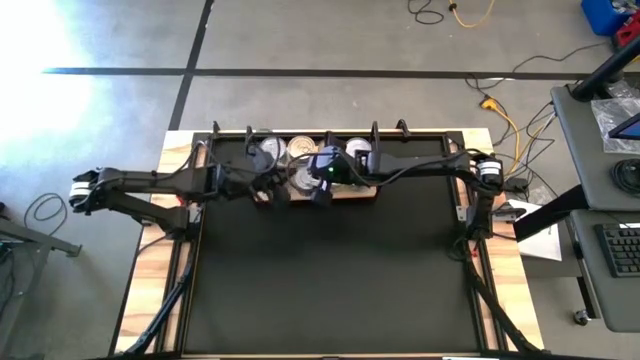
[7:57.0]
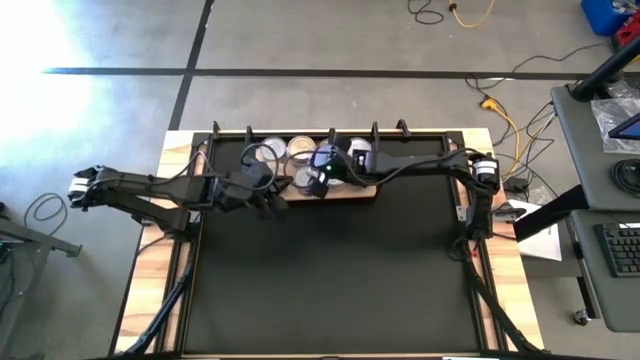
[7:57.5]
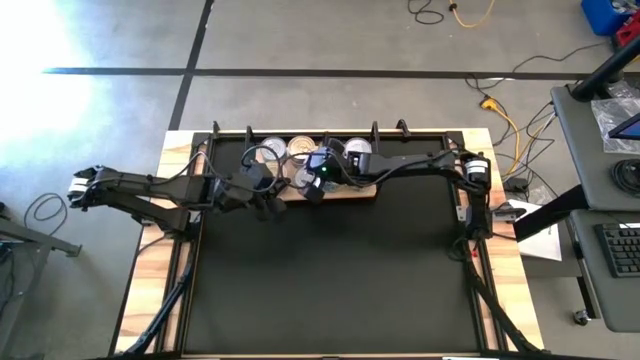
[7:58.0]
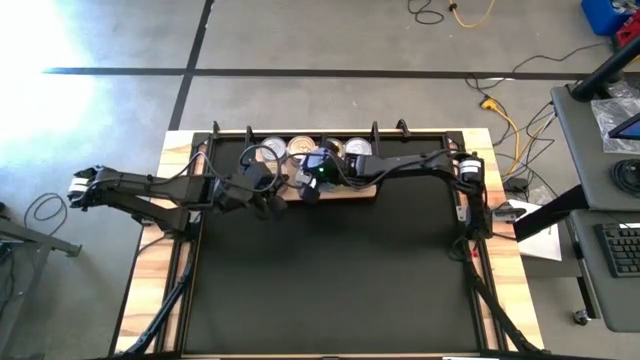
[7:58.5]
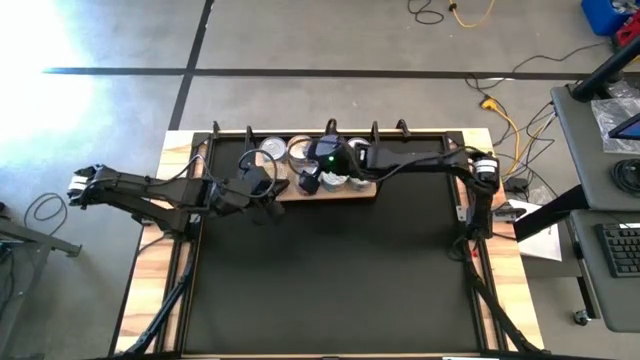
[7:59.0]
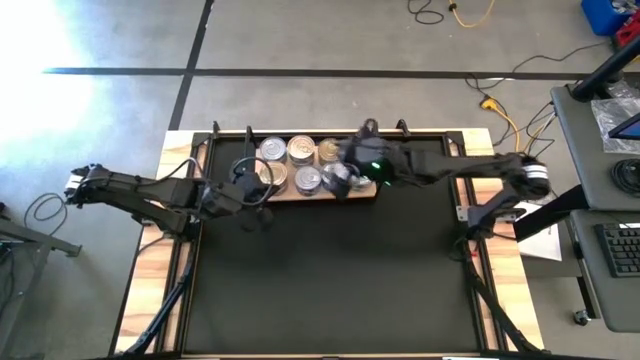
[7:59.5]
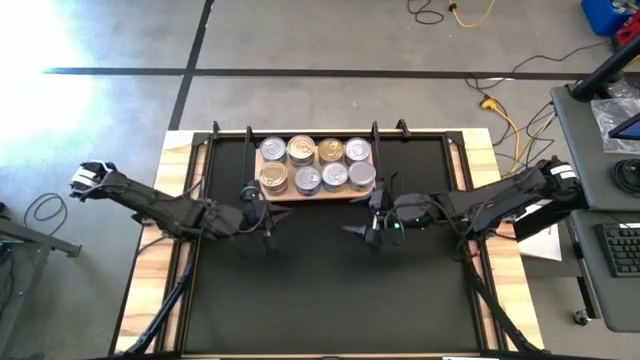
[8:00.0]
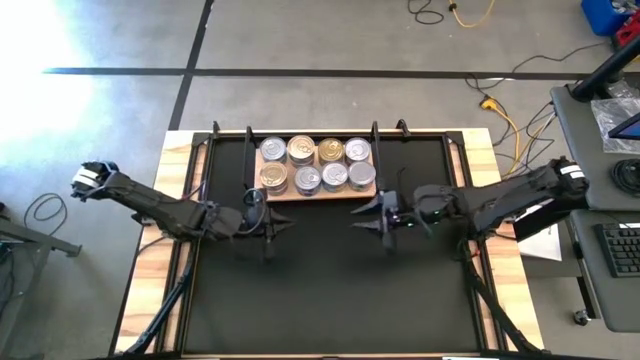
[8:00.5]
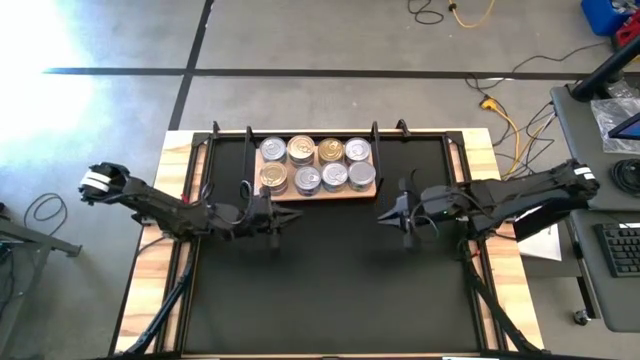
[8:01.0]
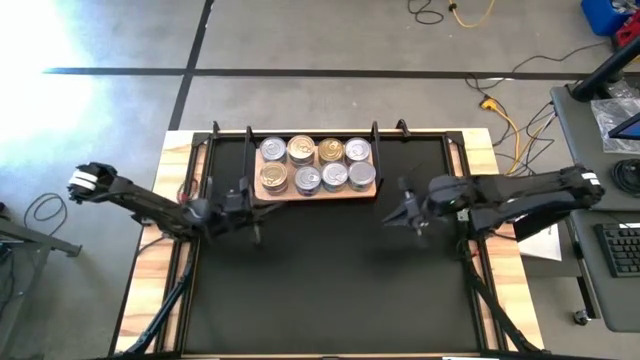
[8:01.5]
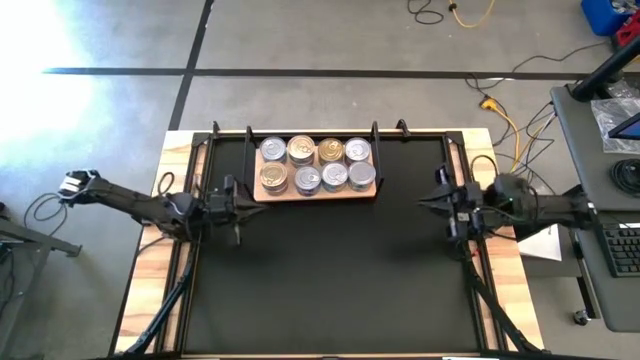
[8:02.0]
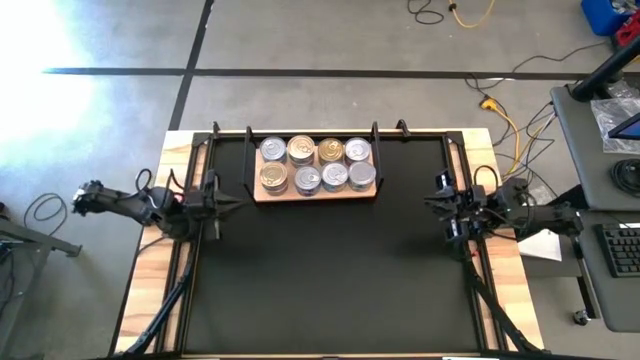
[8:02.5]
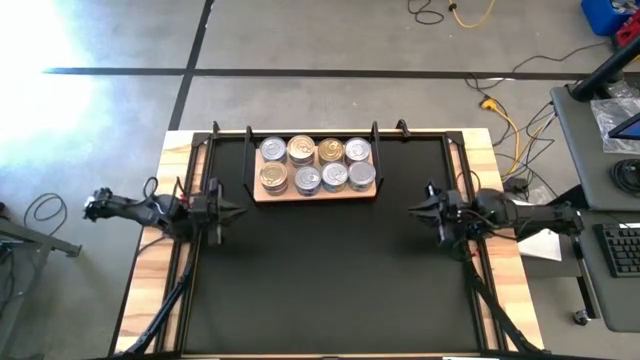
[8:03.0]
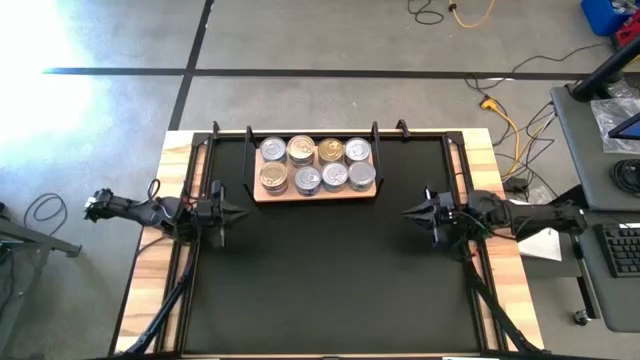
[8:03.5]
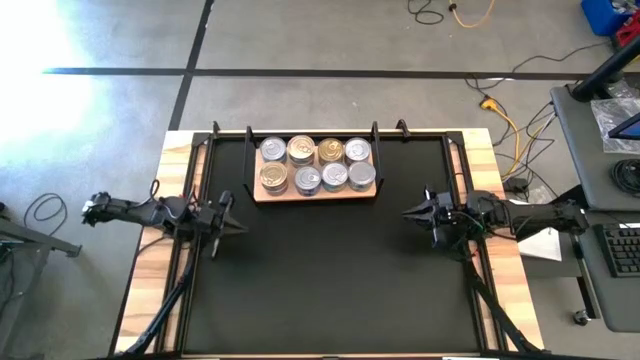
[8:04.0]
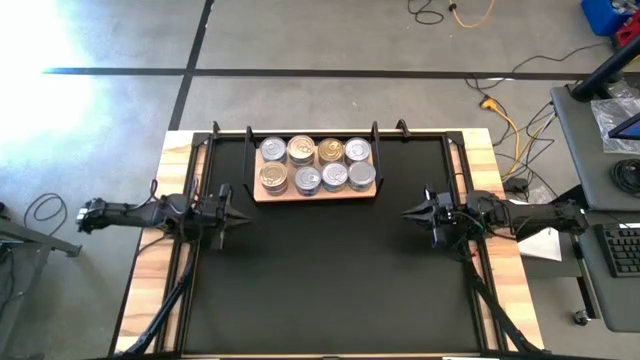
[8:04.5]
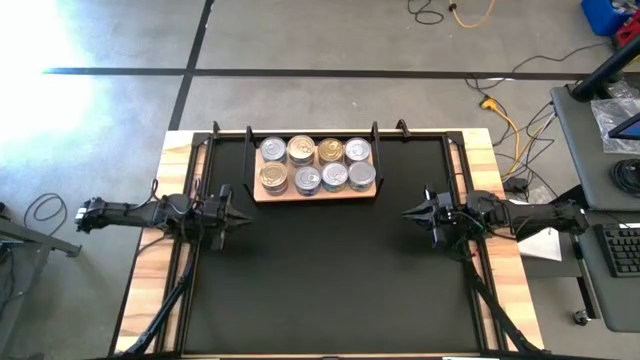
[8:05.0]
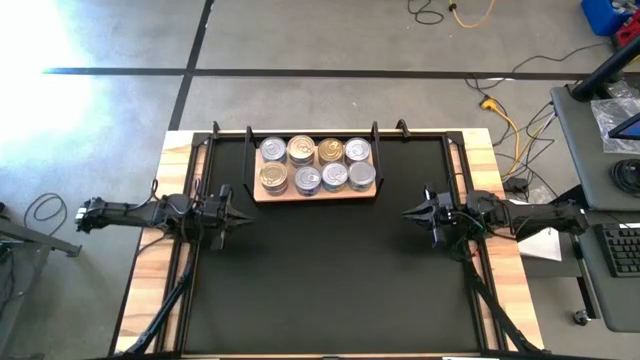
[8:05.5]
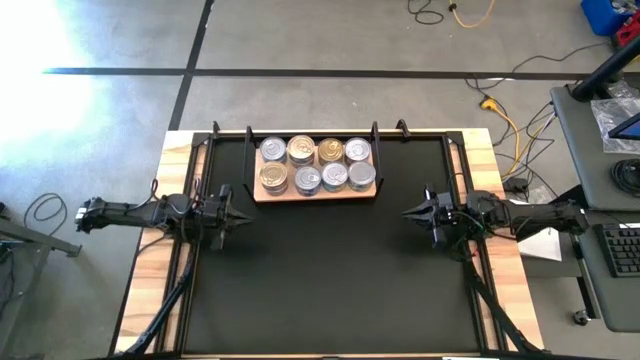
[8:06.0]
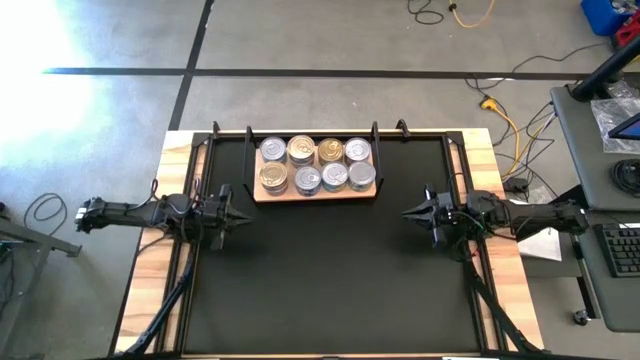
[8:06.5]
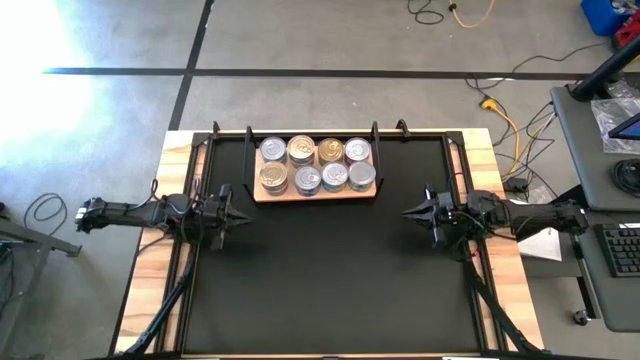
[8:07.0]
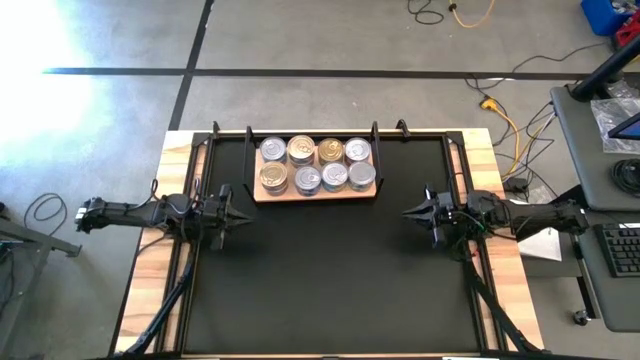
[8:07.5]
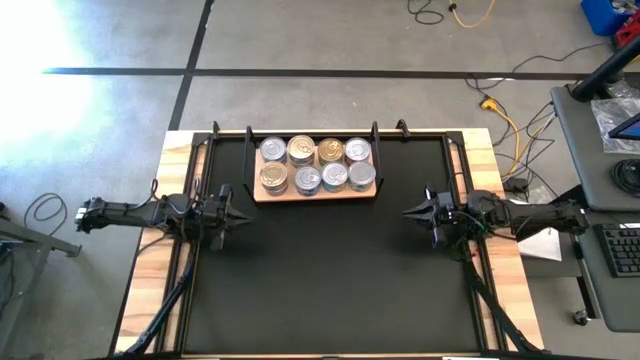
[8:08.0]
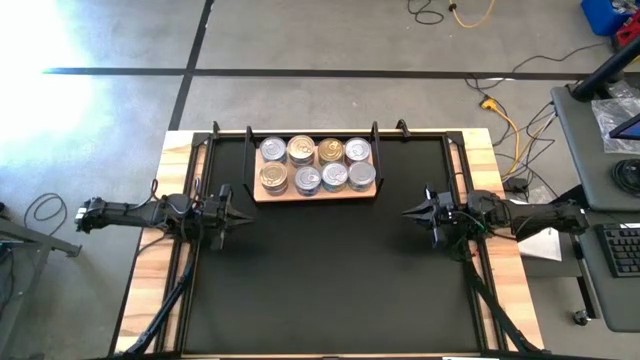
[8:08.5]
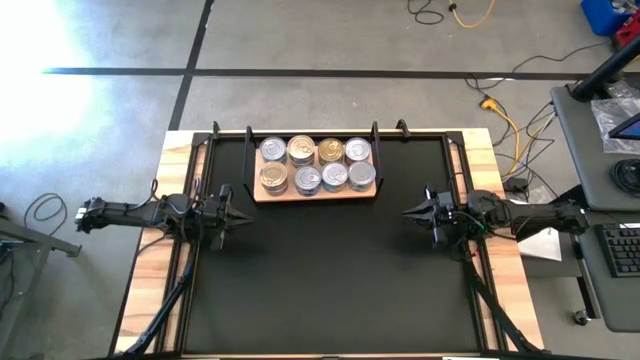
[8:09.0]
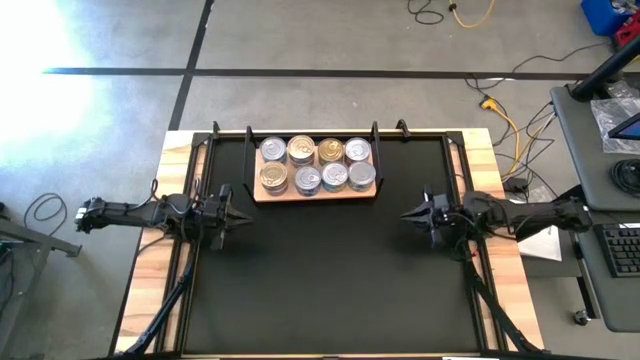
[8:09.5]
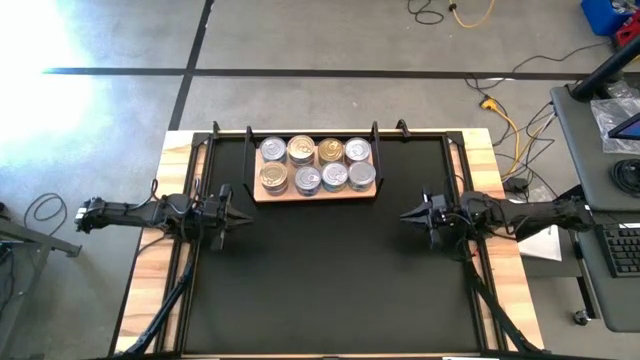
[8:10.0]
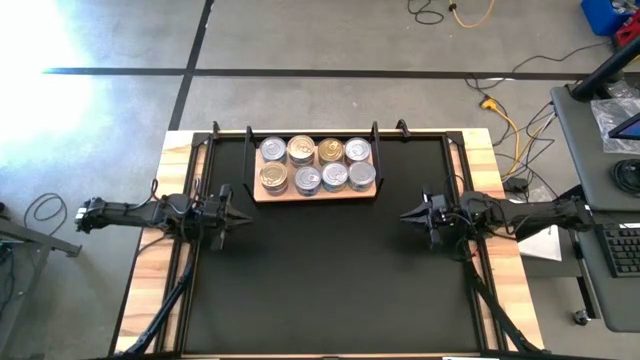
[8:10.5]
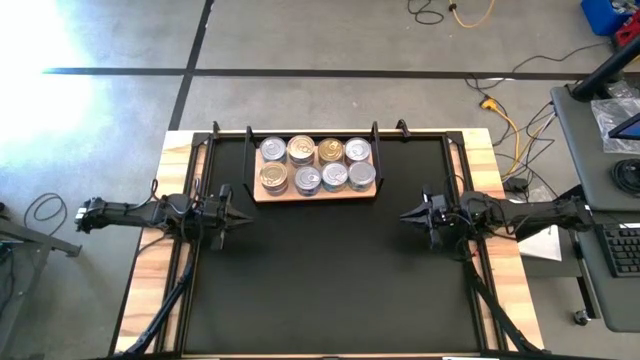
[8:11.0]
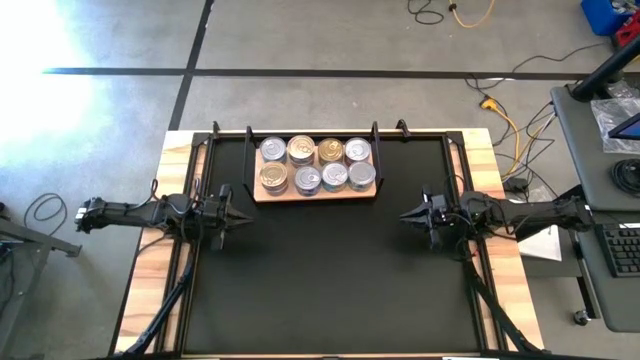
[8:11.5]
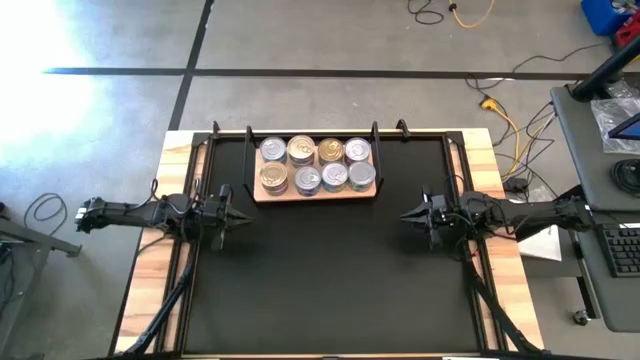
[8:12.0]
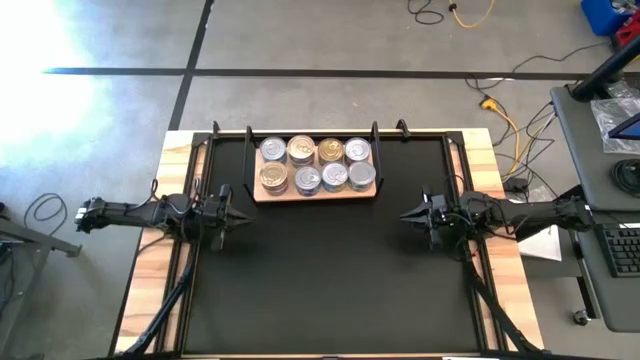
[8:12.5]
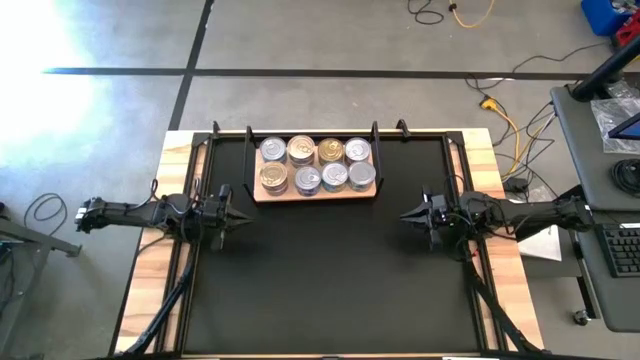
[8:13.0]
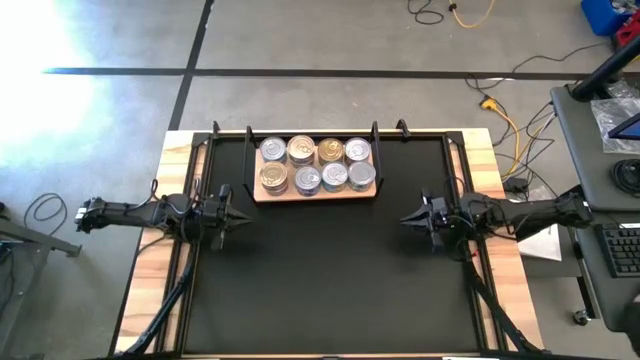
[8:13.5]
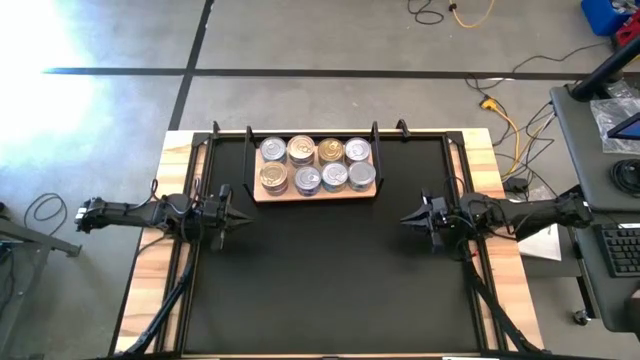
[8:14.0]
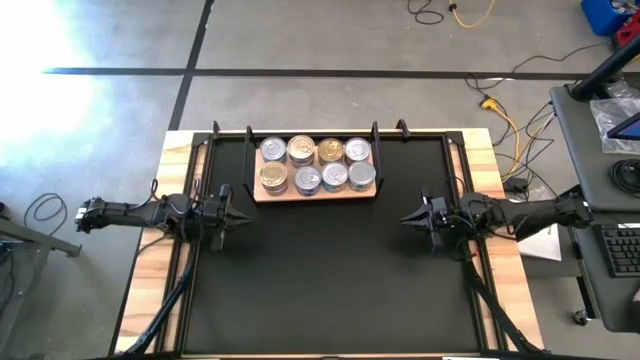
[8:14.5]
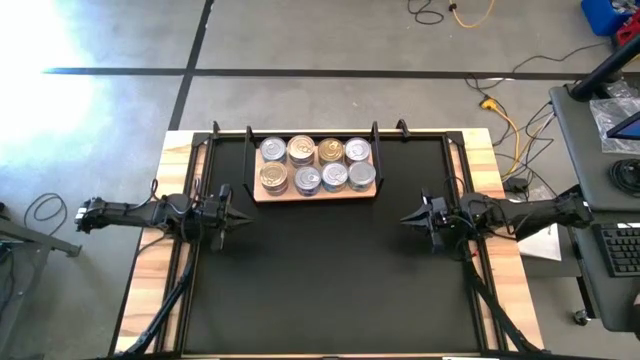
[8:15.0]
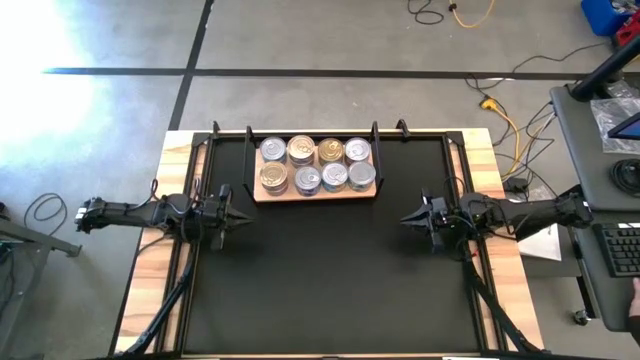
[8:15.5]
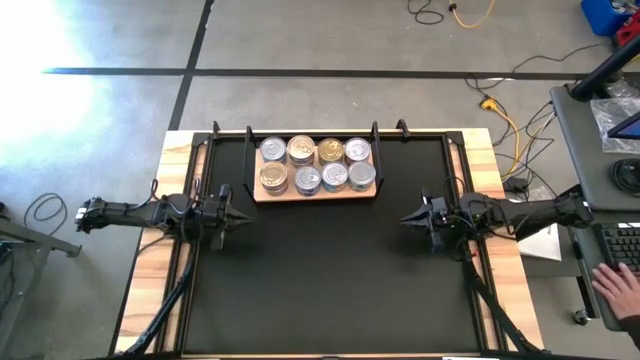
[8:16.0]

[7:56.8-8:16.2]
Task: Stack canned seafood by type on shelf
Return to Home Position
